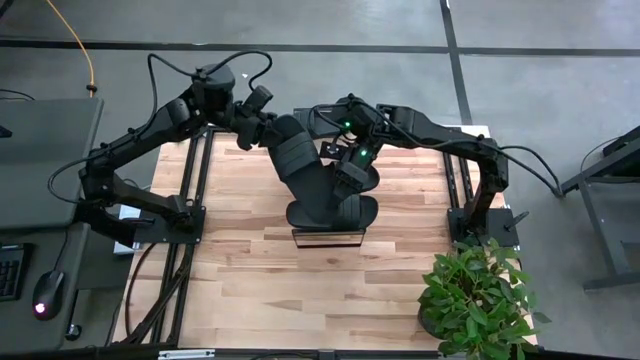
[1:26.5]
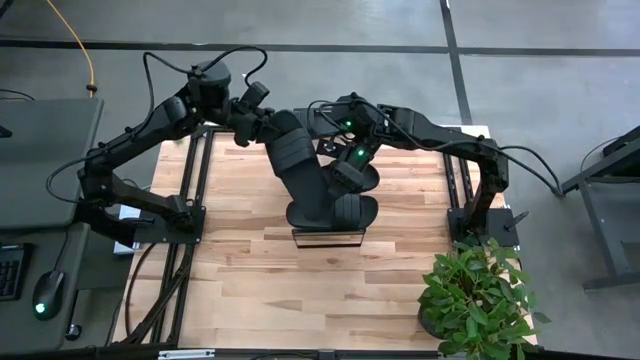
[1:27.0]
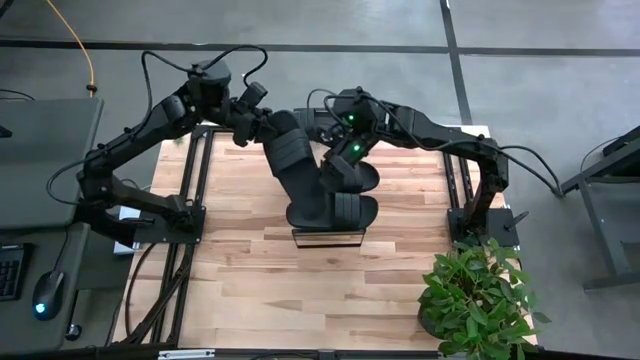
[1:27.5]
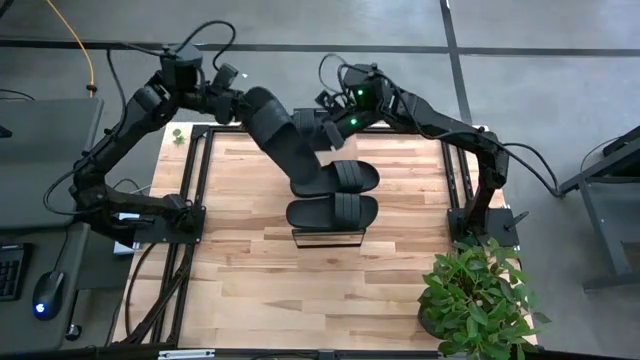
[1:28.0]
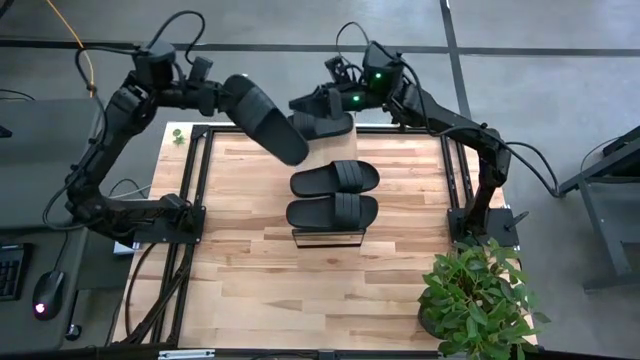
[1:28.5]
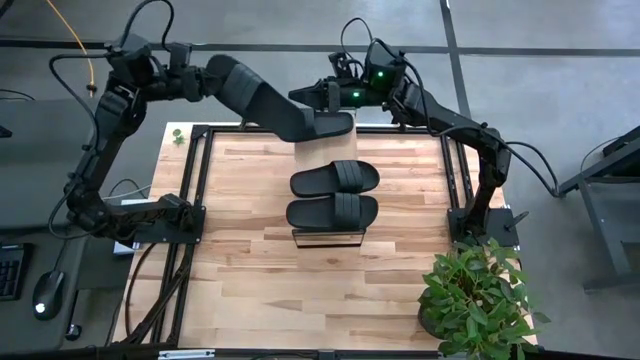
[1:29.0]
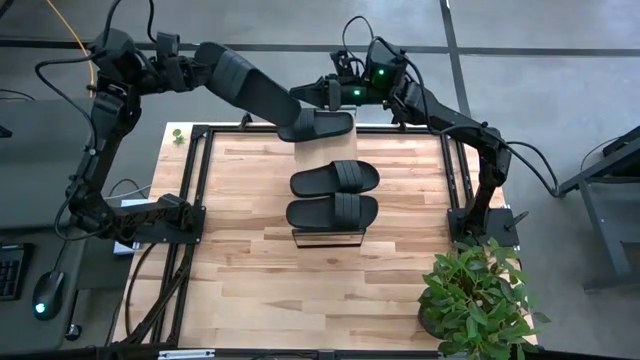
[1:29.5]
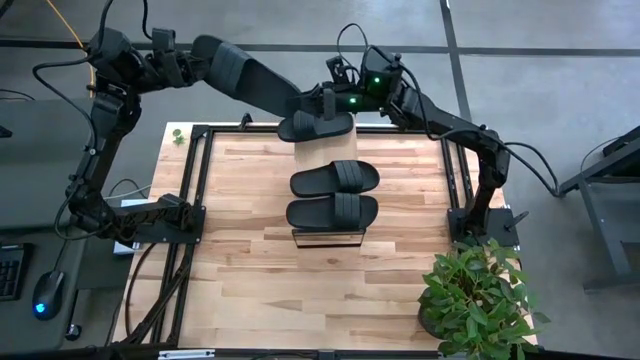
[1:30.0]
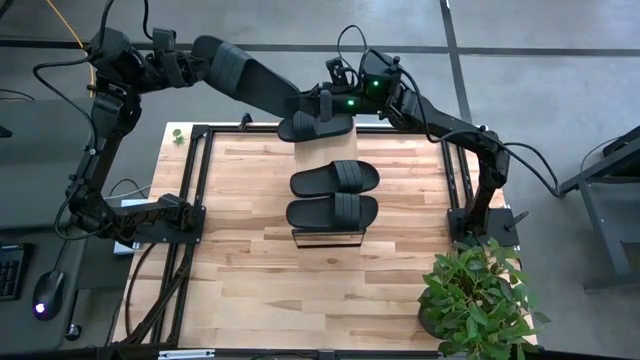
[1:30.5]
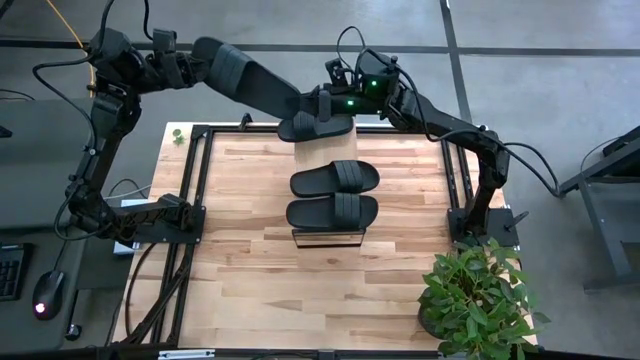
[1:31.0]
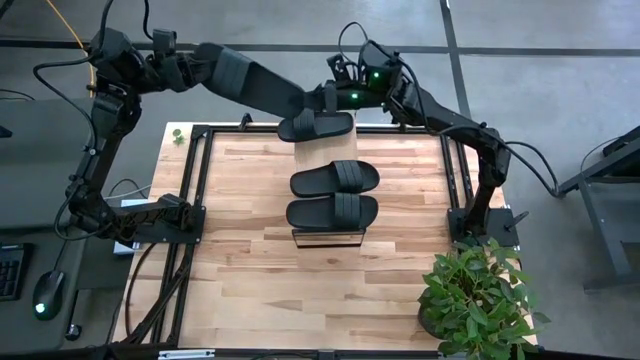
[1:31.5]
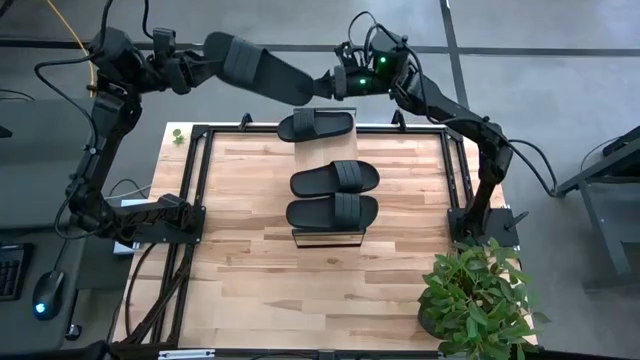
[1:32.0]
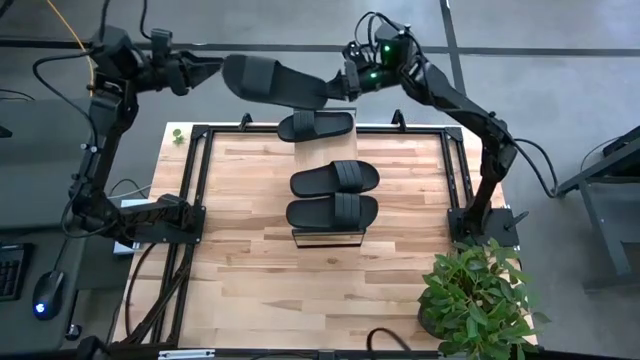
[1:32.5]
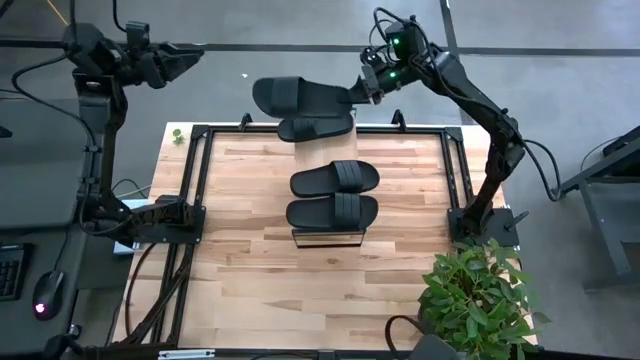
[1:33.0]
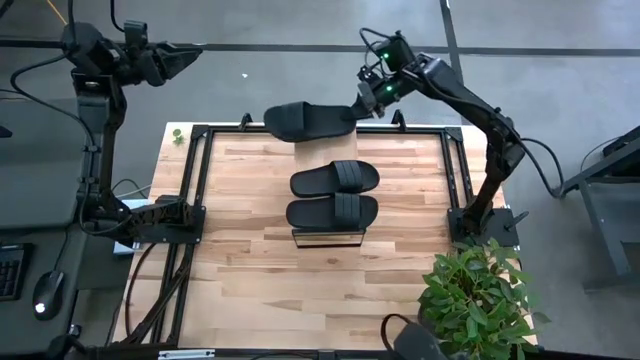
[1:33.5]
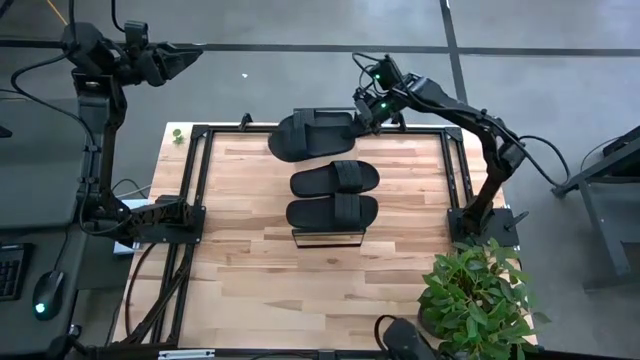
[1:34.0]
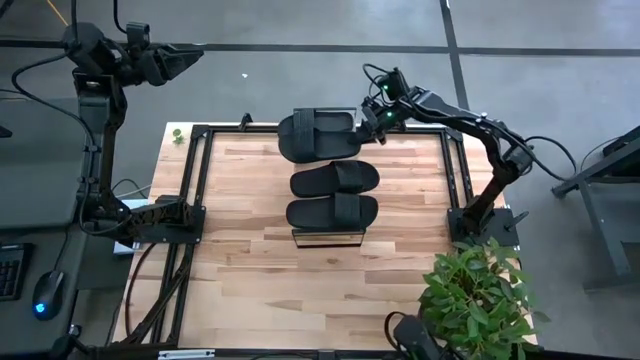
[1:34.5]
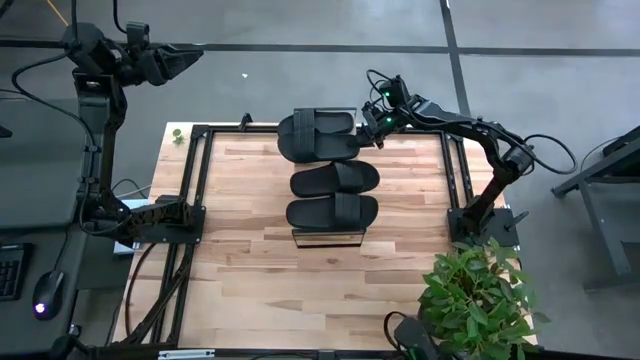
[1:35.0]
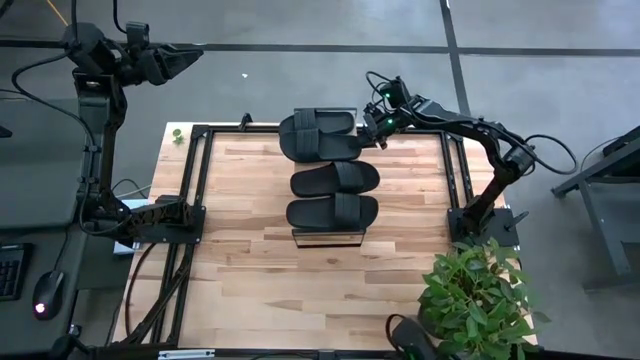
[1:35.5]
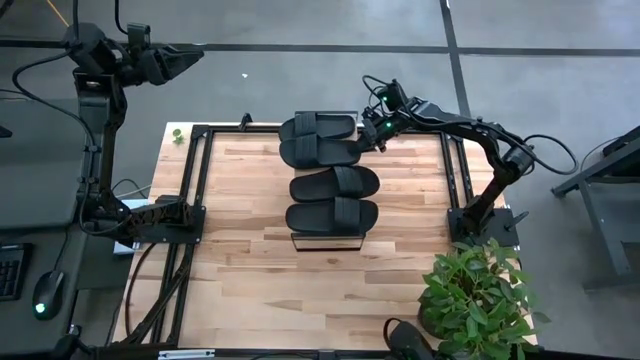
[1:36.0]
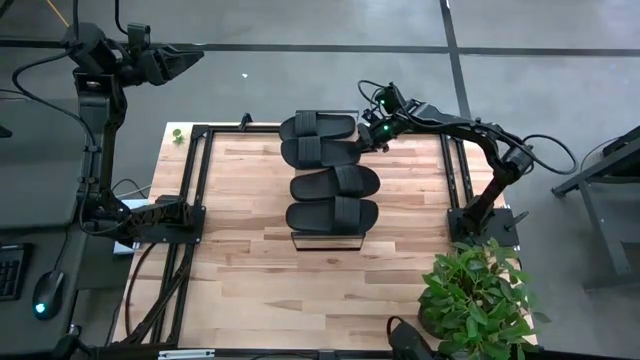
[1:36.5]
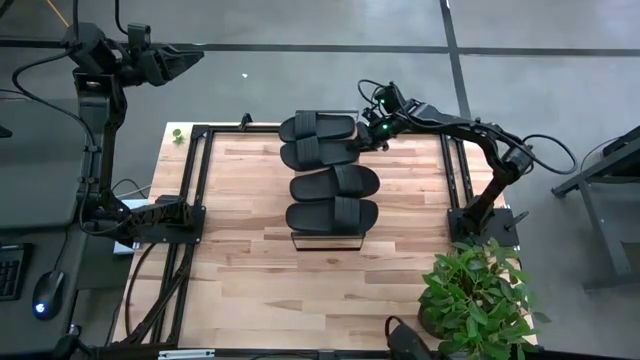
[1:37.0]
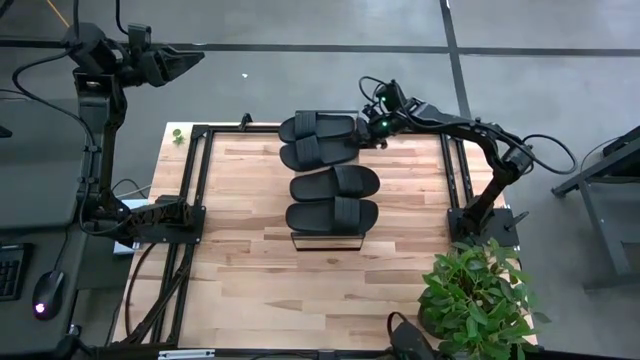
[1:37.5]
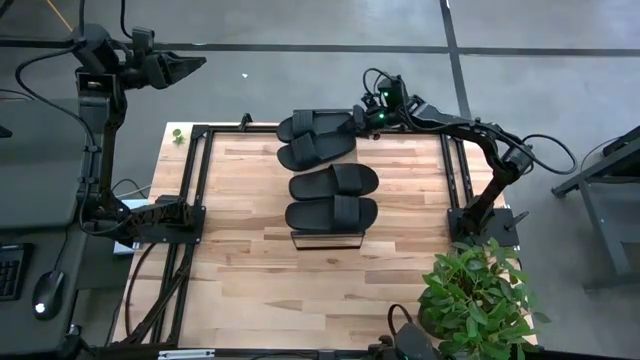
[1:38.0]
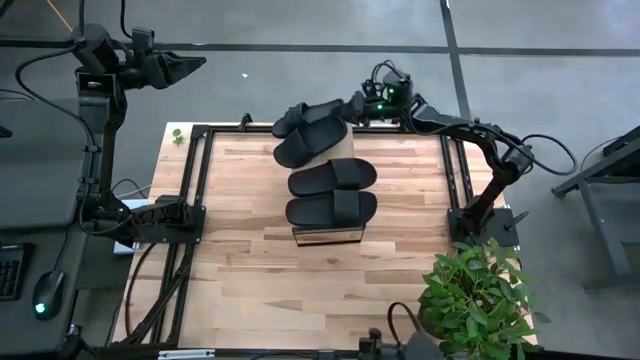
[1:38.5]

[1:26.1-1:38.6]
Task: Pick and place slides into the shelf
Put the black slide on the shelf

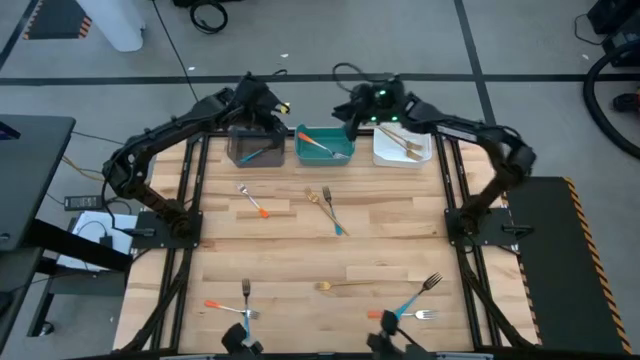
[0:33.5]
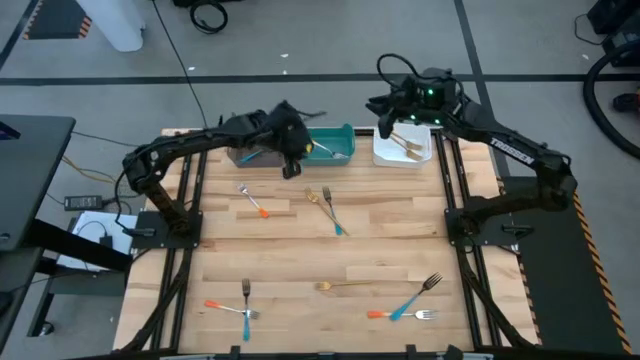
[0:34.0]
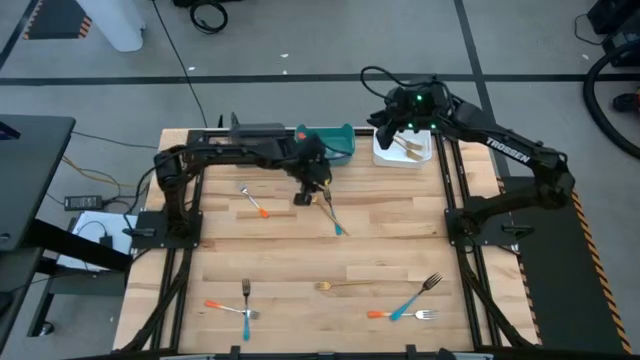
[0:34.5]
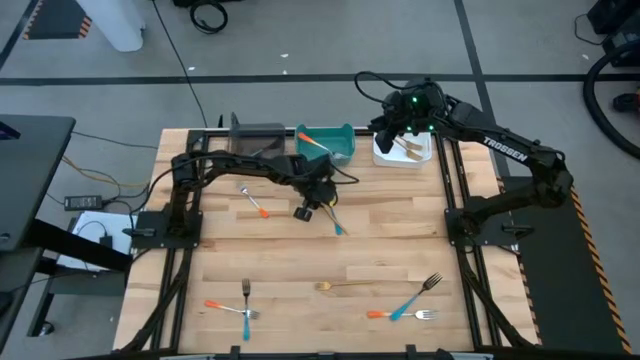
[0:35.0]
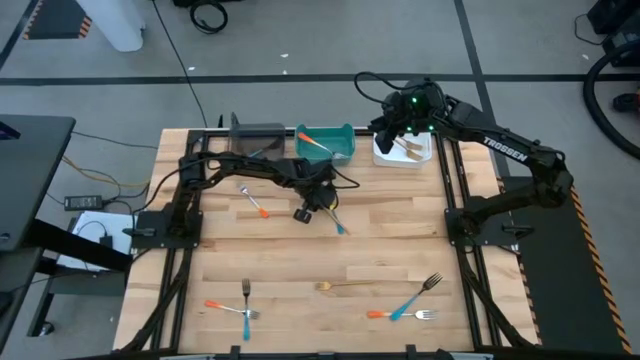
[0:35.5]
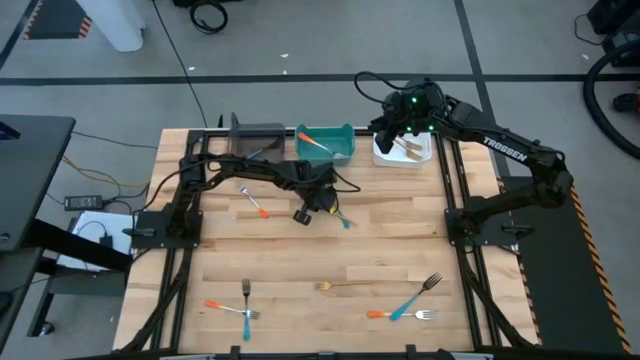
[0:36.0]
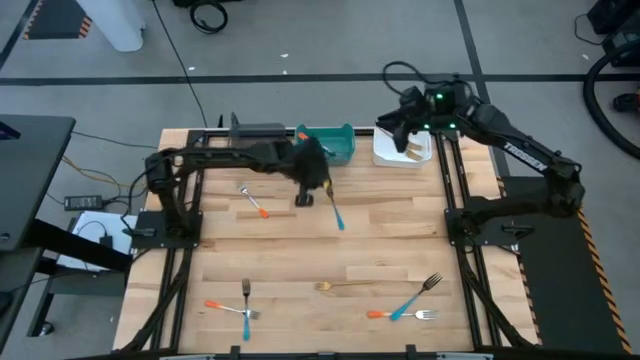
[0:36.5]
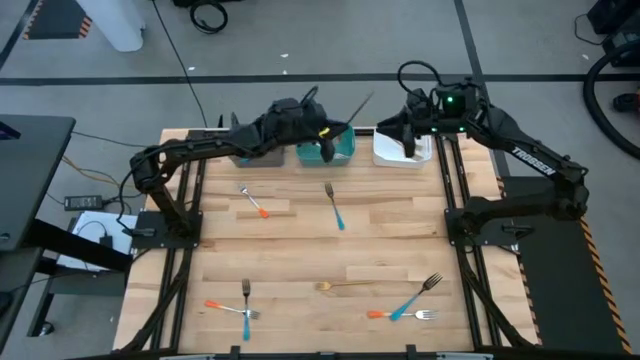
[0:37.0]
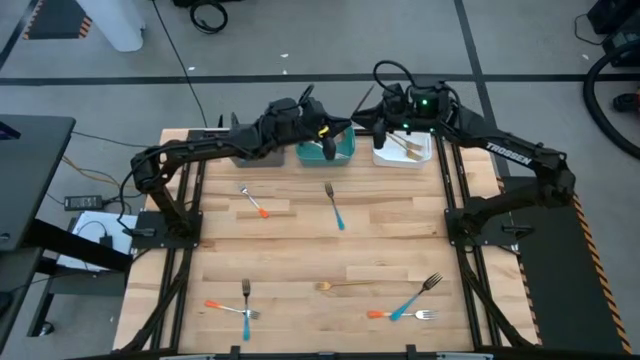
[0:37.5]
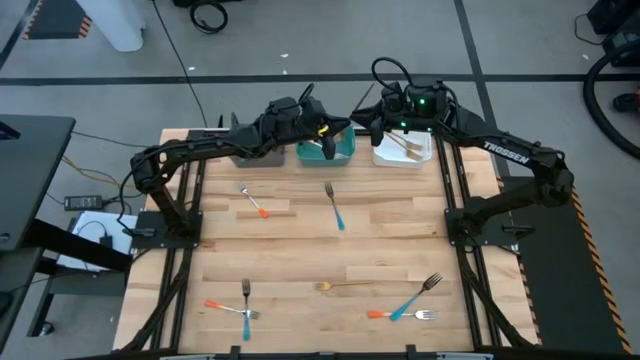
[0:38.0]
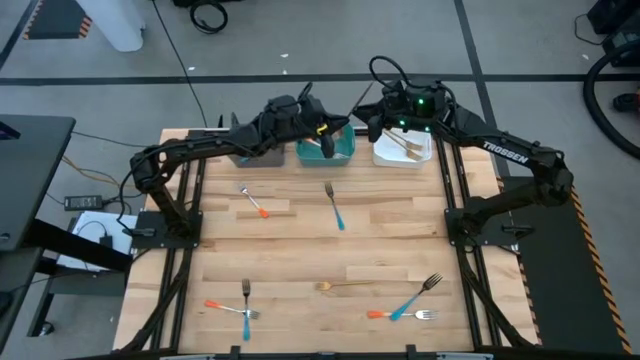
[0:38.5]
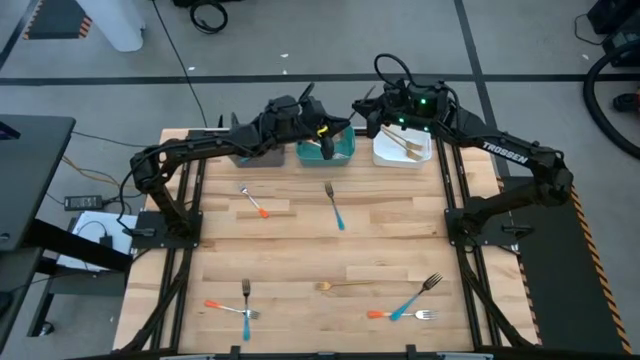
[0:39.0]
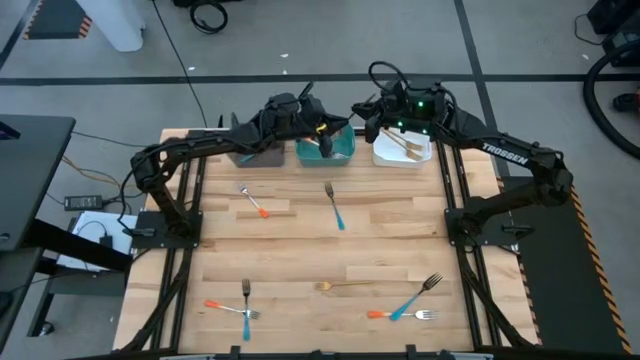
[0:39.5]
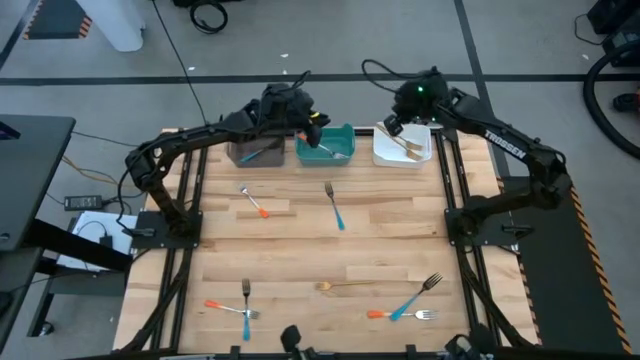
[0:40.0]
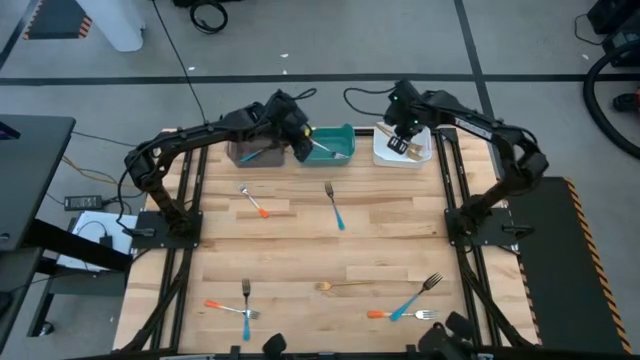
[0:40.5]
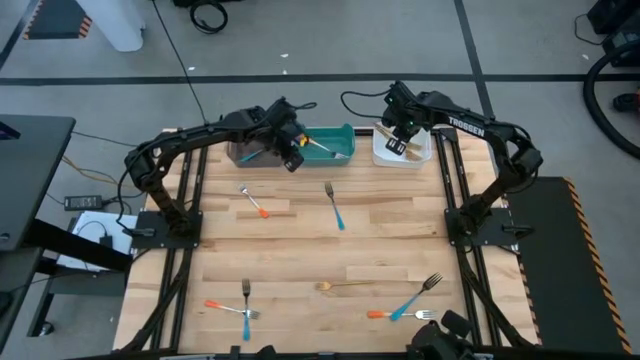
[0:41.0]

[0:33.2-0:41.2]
Task: Sort silverware by color (type)
Put the top gold fork into the white bin
